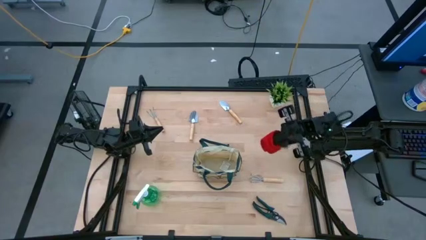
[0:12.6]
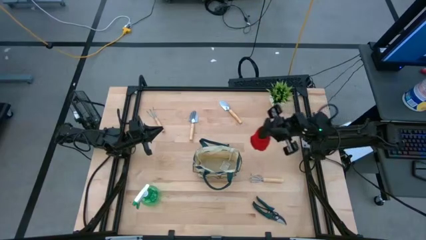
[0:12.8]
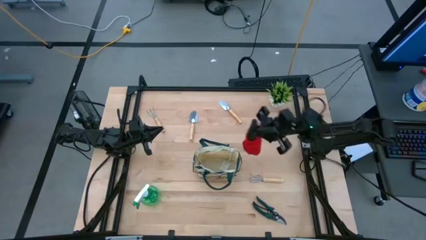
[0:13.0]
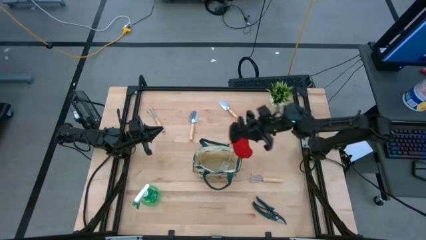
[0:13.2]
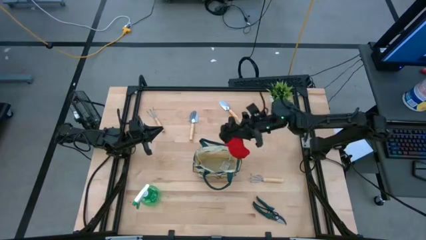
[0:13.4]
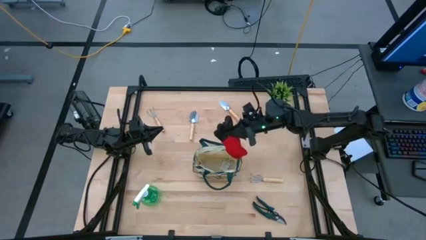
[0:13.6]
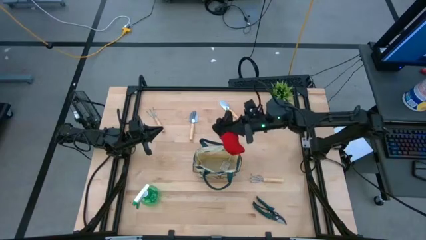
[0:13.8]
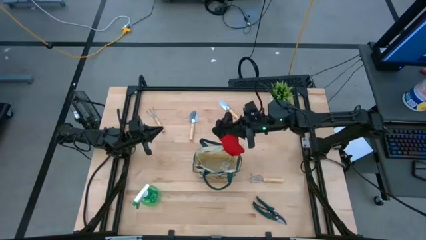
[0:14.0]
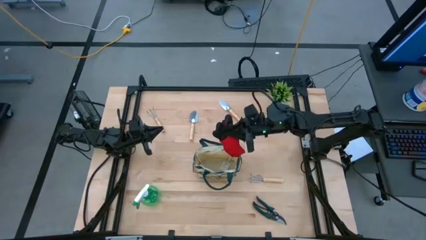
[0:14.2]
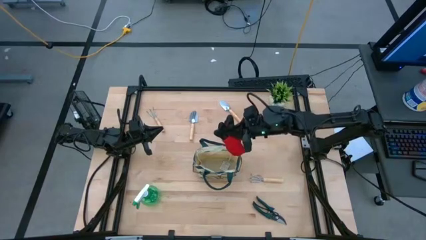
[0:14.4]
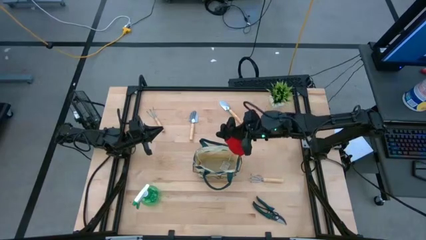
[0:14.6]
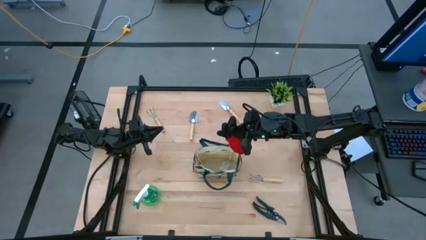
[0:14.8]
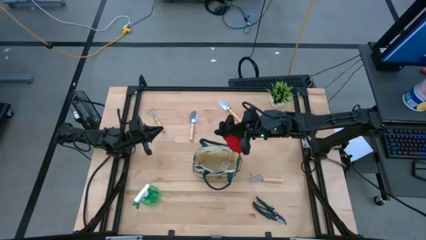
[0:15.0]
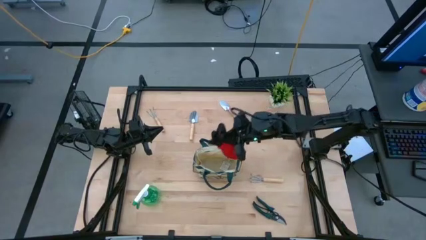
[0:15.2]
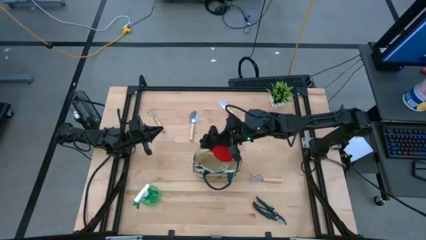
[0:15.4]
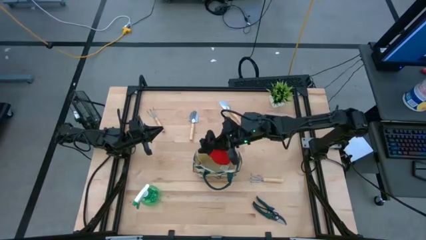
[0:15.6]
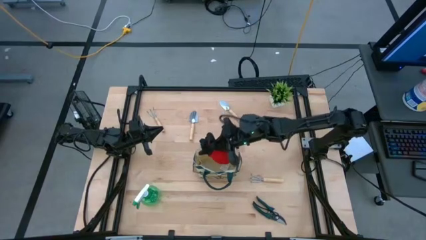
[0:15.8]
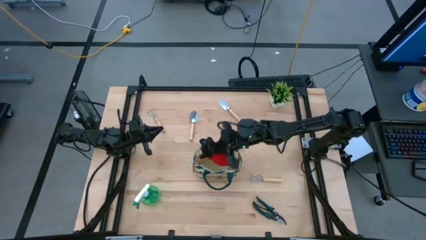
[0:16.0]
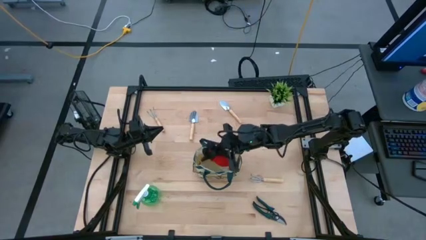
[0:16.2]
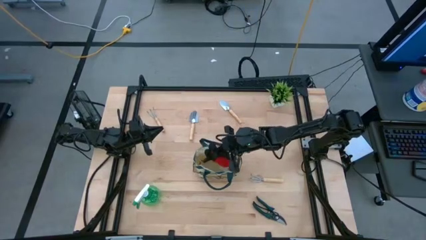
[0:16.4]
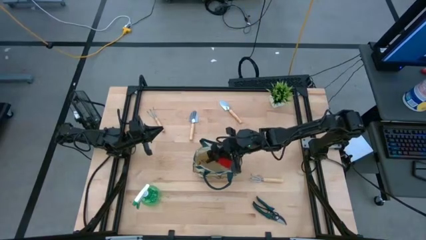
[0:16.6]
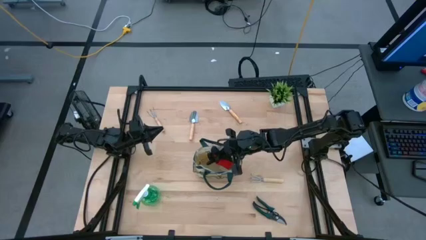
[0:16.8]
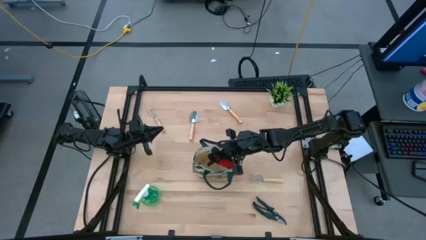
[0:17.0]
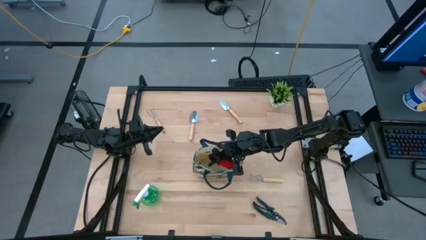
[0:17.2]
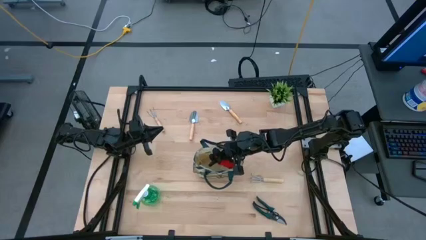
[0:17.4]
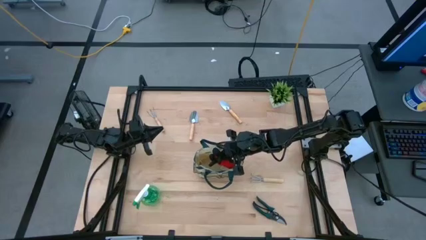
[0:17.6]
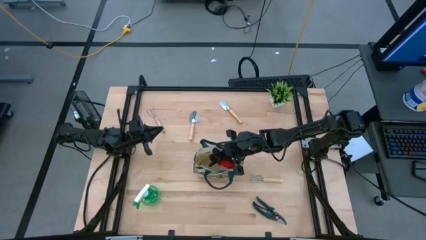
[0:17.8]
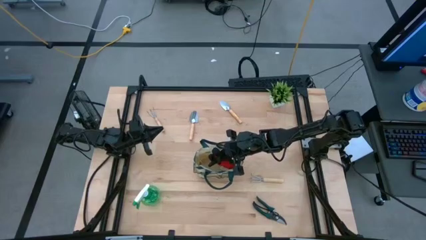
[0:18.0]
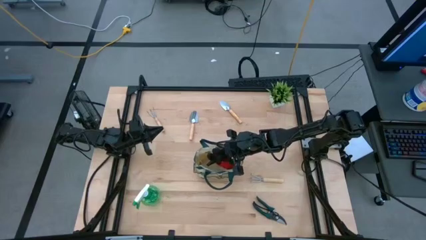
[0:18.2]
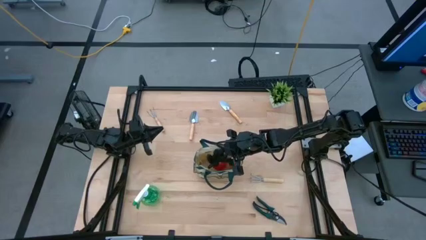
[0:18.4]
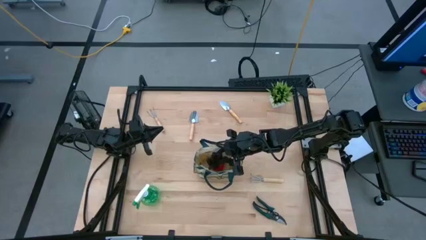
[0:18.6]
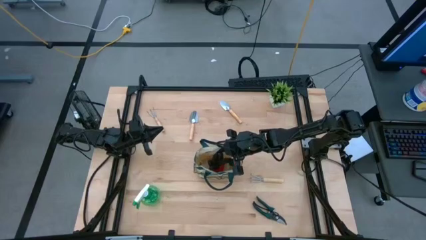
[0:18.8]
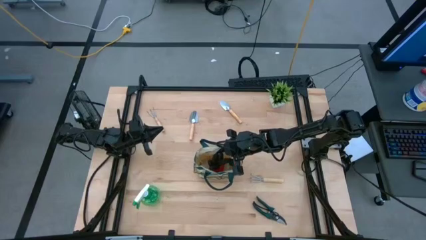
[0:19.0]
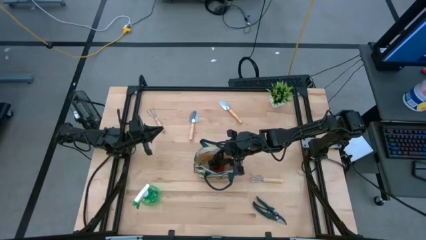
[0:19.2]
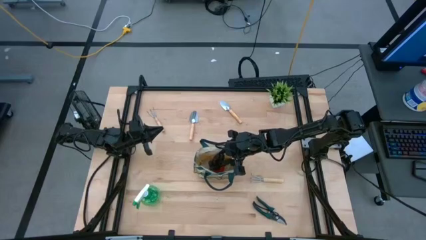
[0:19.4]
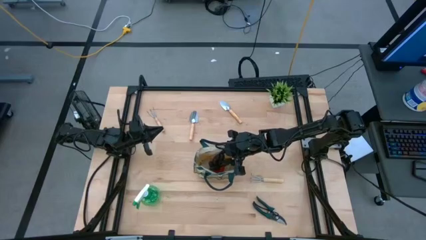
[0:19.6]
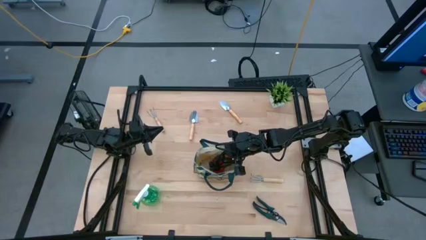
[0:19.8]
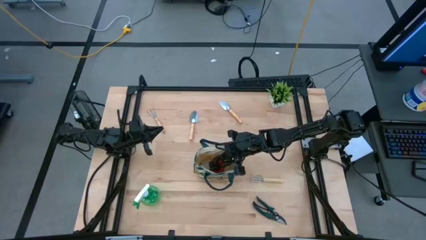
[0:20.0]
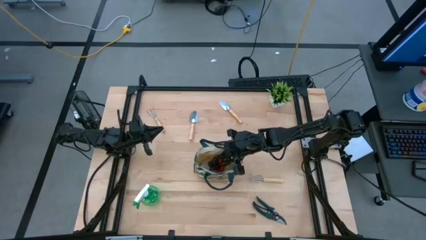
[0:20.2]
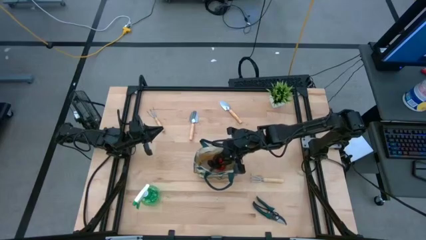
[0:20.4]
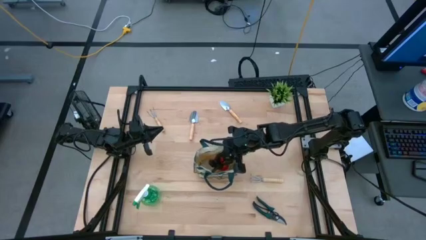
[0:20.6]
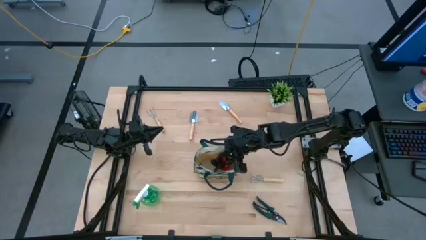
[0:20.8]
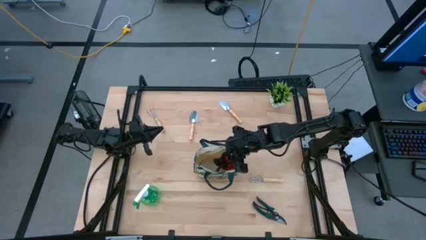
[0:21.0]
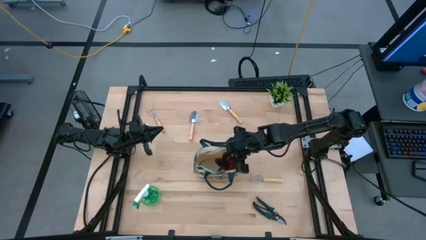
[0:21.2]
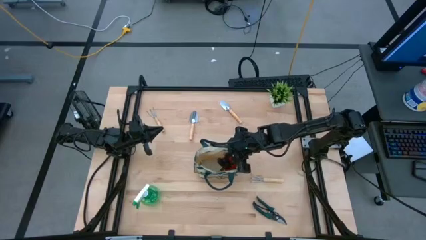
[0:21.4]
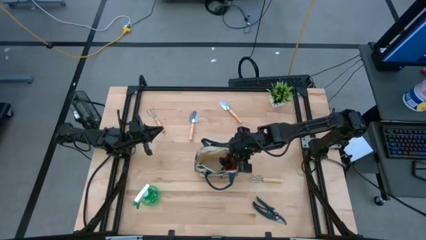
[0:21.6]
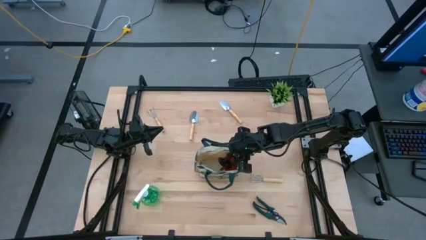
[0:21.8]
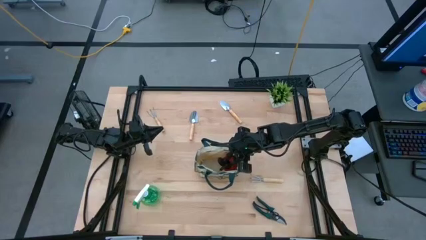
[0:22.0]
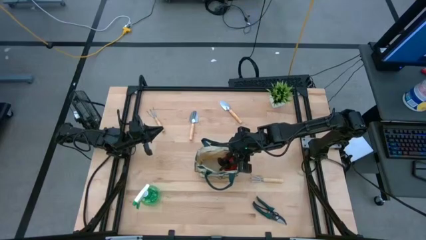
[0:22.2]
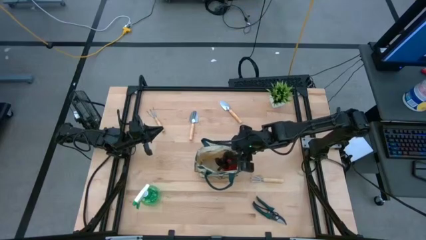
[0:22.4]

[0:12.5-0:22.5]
Task: Pick & Place Garden tools in Gardening bag
Put the red gloves into the white gardening bag

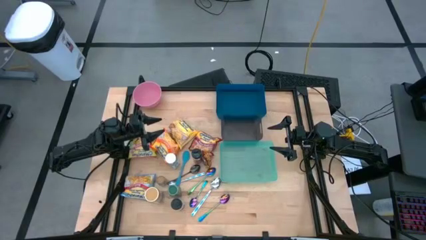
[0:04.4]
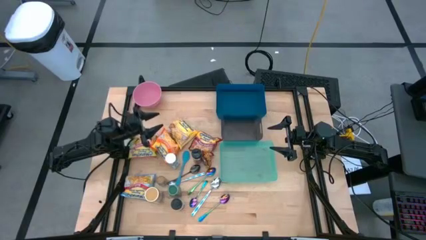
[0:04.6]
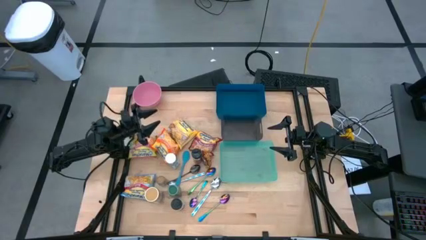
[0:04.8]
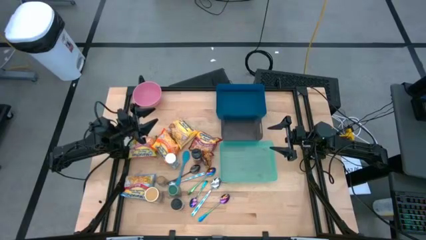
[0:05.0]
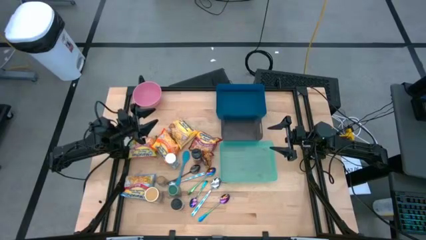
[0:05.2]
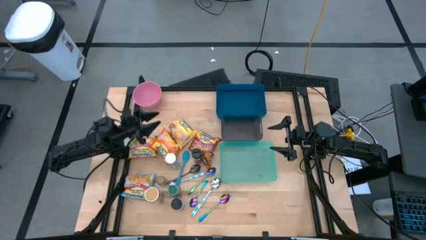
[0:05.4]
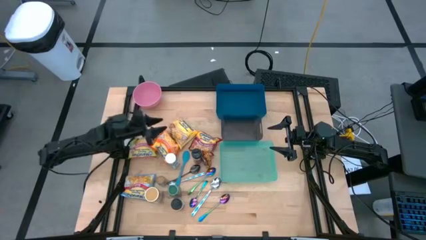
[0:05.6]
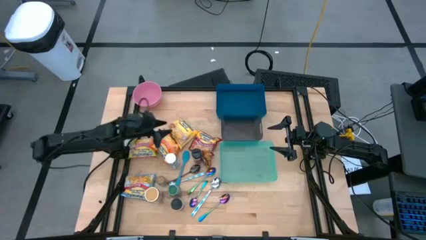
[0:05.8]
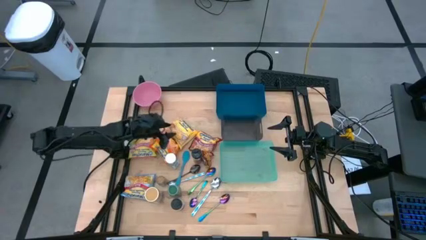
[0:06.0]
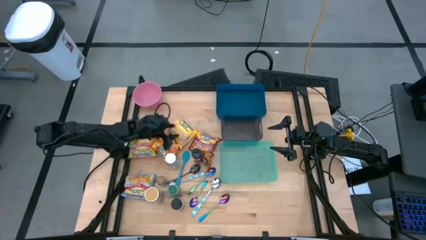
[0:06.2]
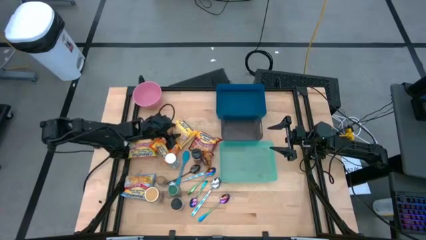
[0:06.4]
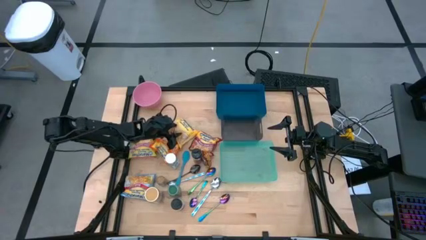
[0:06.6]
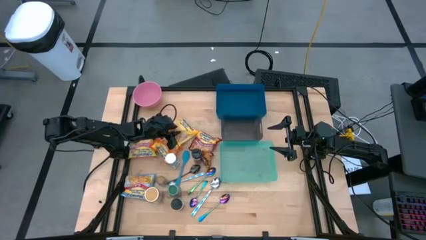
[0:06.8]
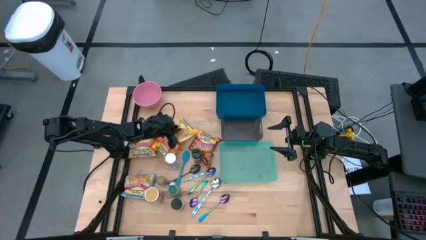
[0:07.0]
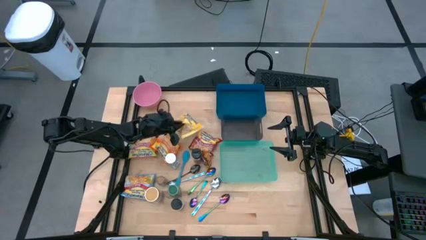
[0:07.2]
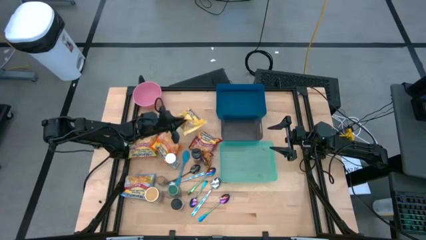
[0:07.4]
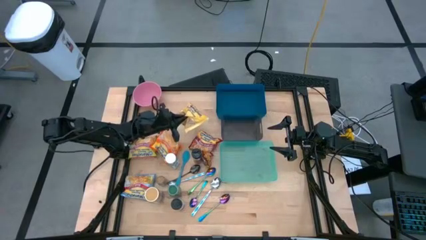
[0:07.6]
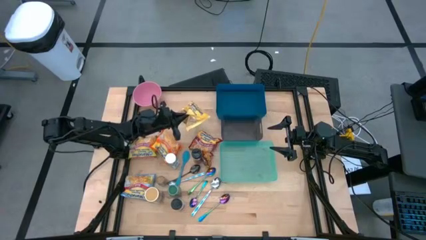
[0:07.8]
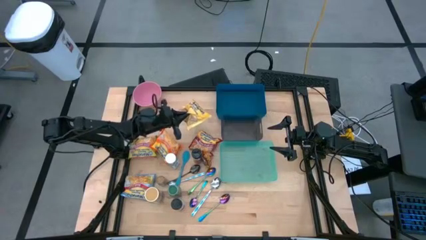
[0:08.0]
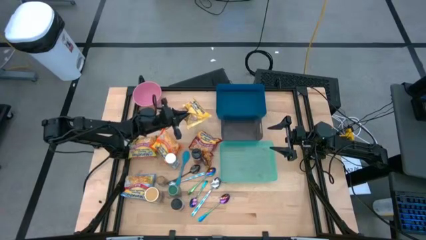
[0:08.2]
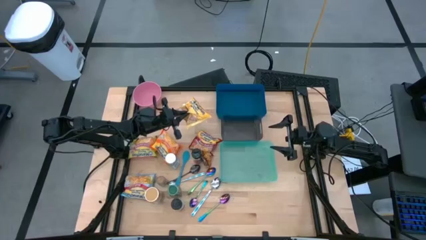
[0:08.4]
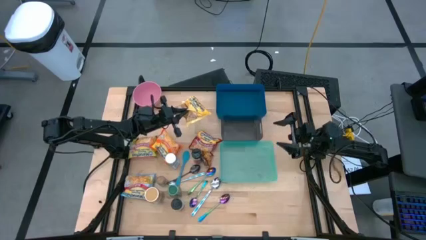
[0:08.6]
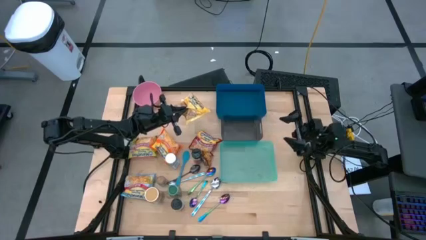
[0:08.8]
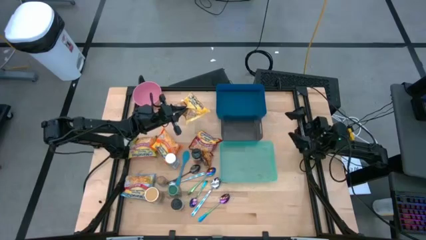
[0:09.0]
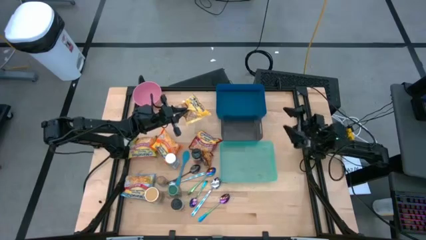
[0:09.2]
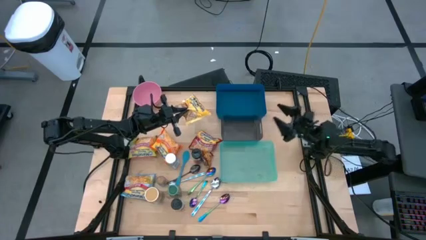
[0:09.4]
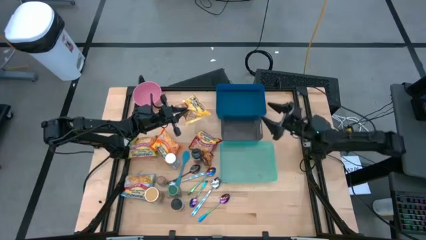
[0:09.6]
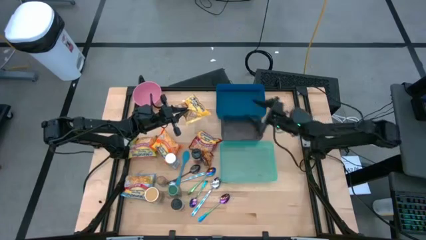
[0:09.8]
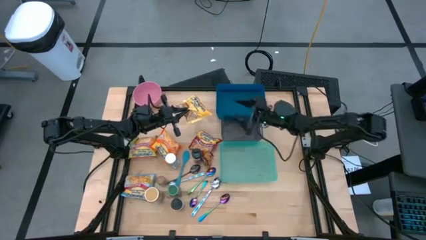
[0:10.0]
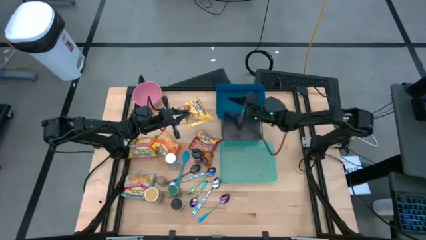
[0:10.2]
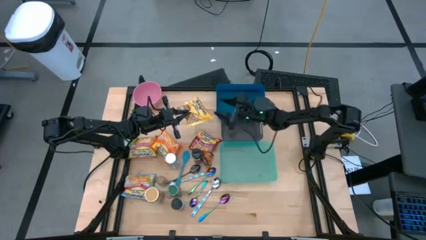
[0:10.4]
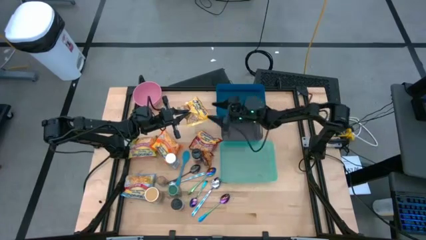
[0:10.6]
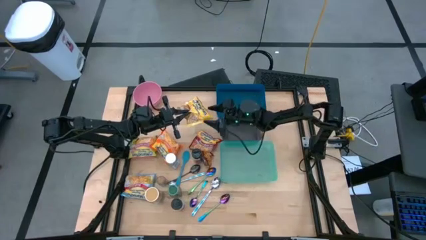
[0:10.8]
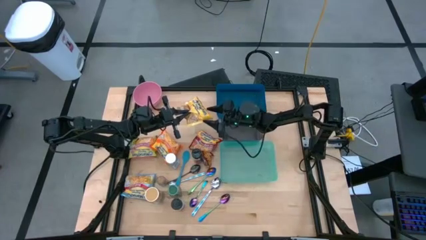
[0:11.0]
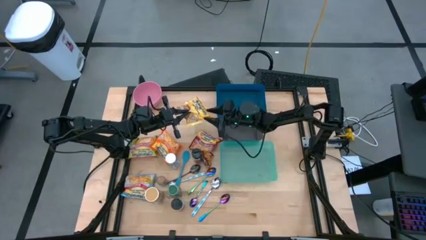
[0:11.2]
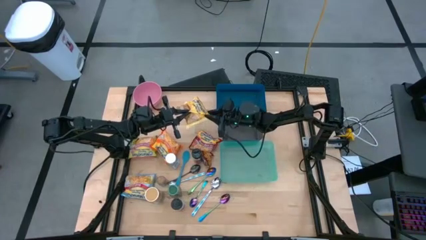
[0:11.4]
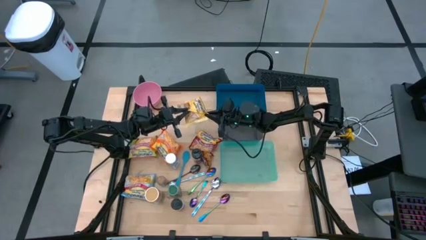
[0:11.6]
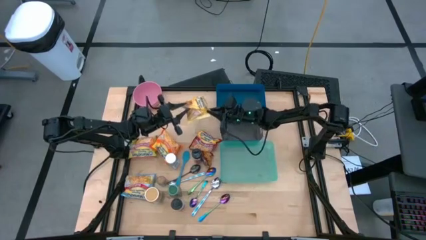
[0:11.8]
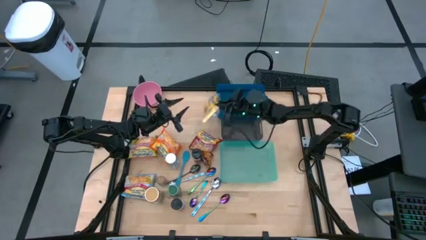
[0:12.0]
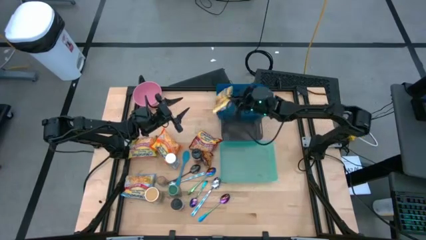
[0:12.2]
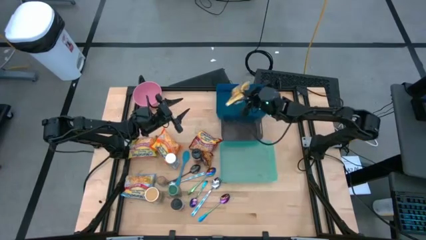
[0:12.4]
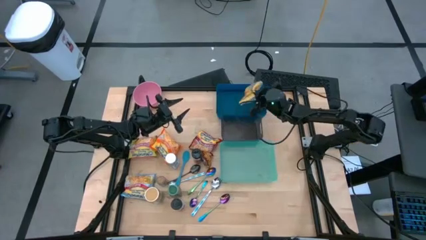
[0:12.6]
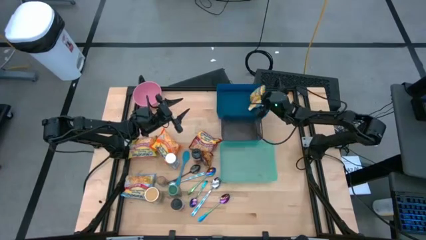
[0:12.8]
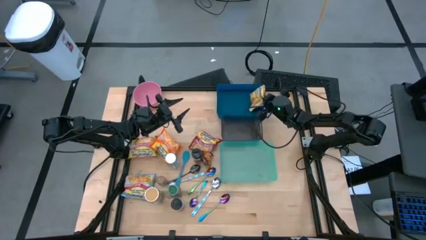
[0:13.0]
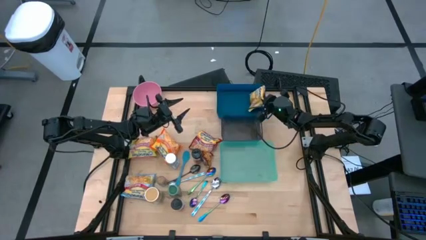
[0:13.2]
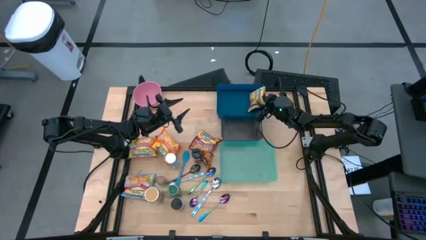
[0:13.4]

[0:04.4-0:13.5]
Task: Pick & Place Food Item
Put the yellow noodle pack into the blue bin
